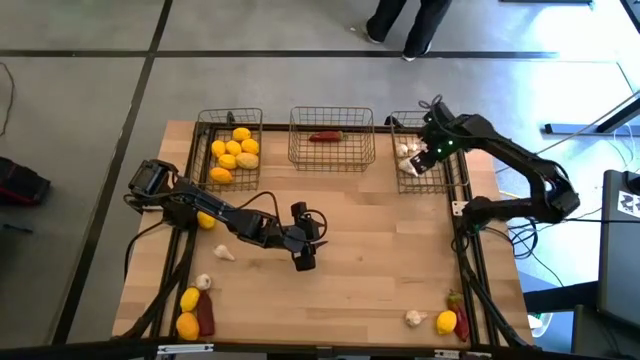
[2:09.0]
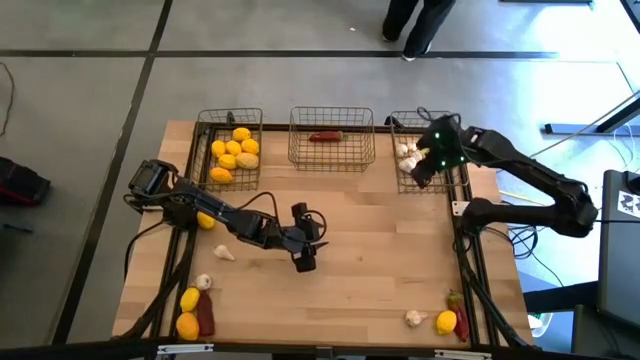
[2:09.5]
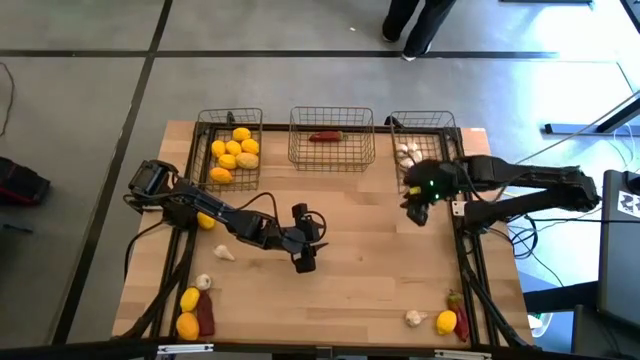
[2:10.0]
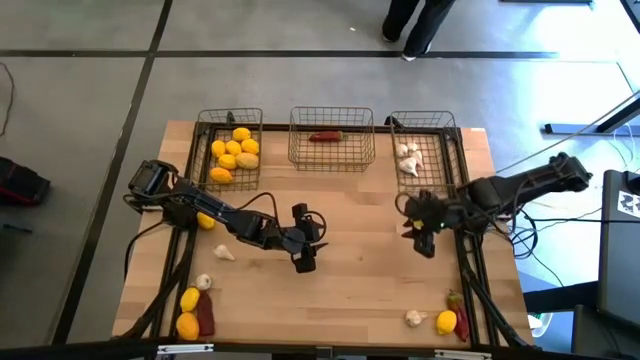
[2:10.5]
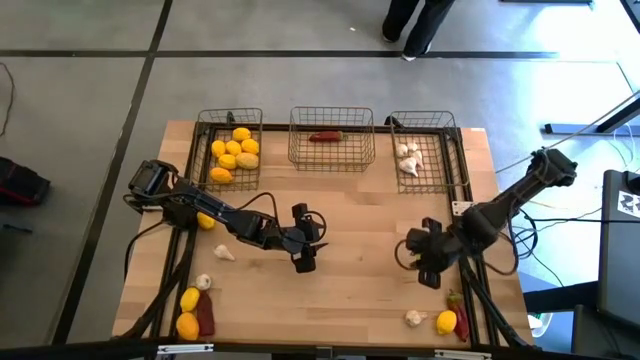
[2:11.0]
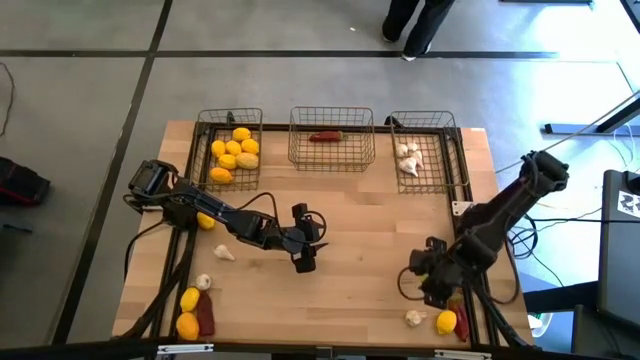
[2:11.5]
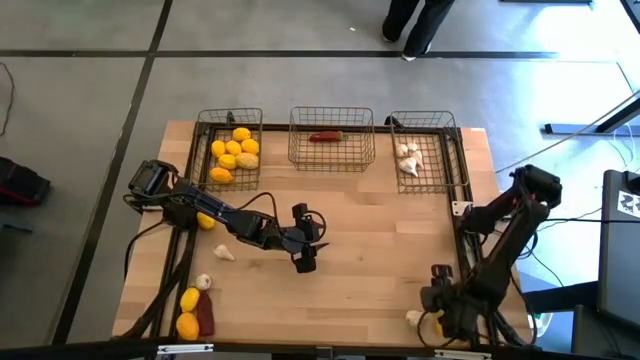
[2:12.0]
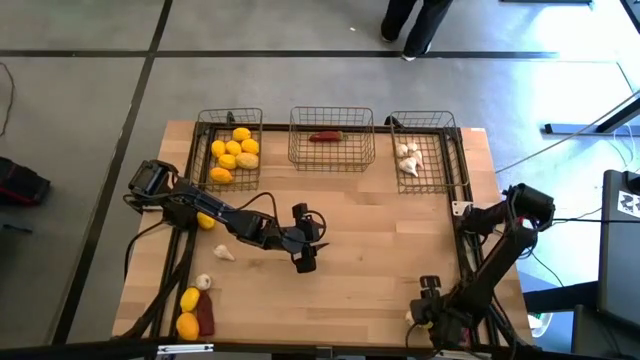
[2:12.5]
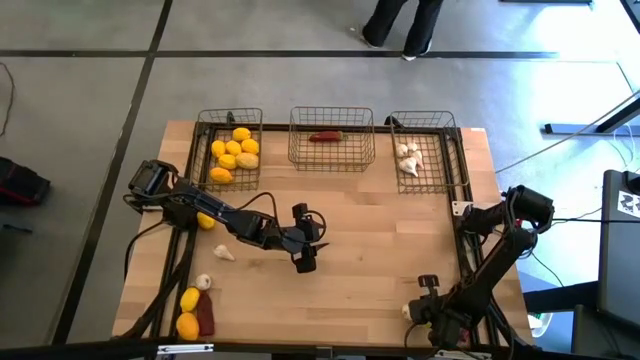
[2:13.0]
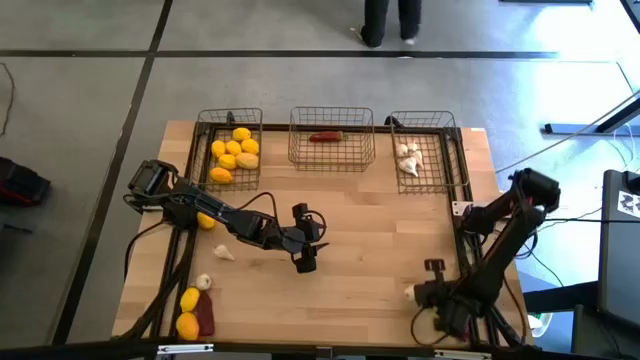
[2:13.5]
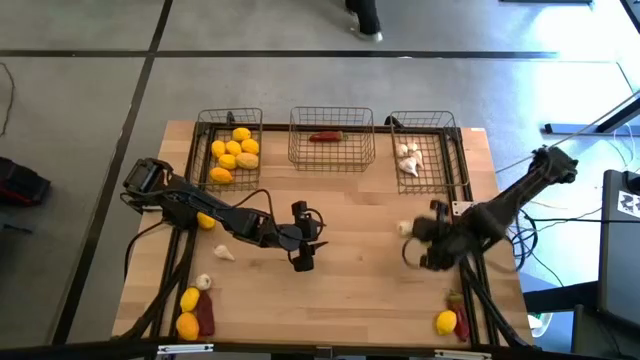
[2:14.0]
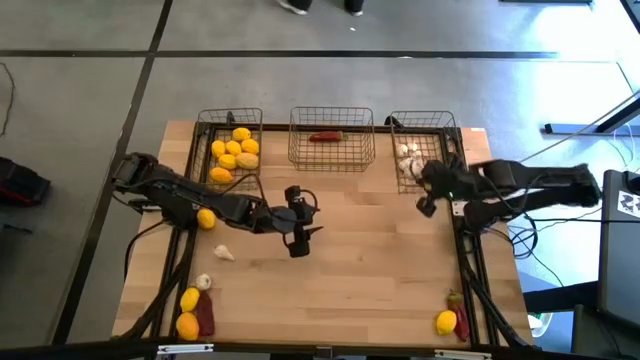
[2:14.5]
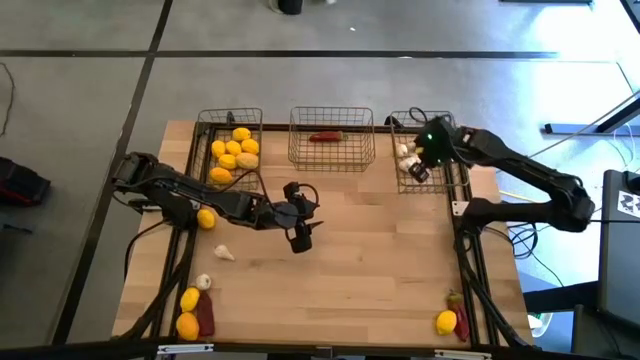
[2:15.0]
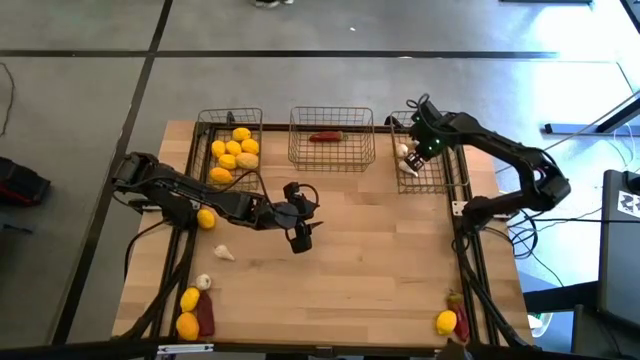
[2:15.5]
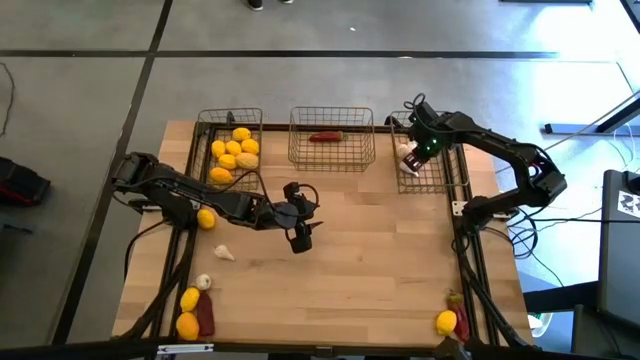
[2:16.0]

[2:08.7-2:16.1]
Task: Sort produce into baskets
Put the white garlic into the right gold wire basket

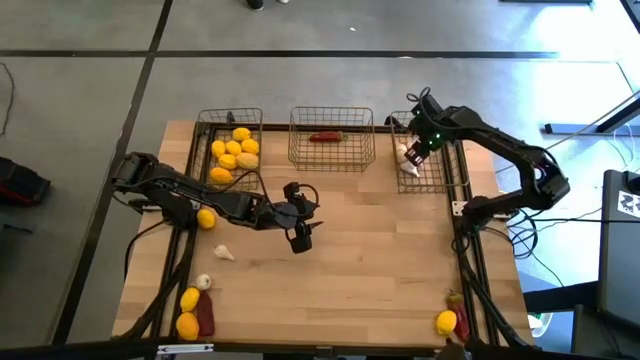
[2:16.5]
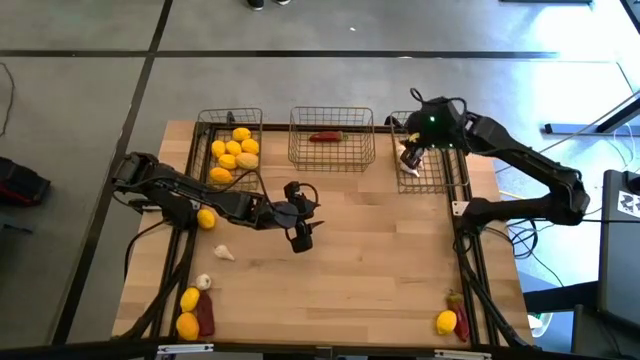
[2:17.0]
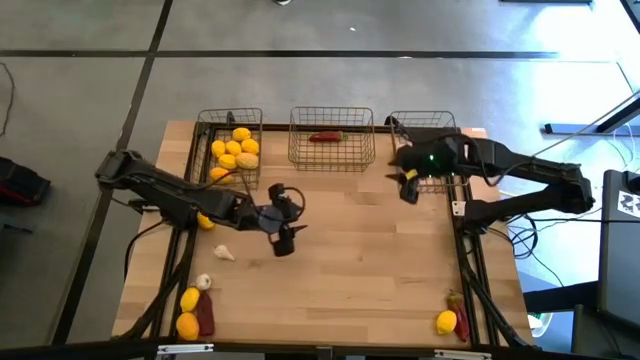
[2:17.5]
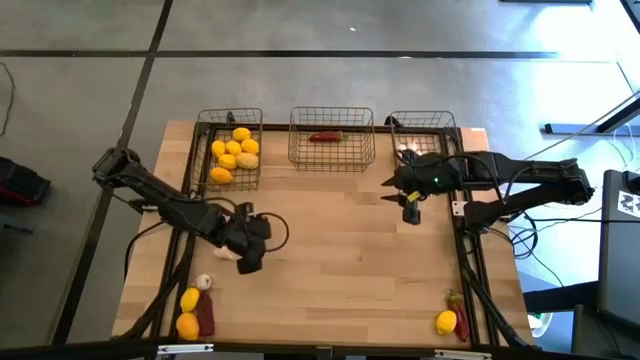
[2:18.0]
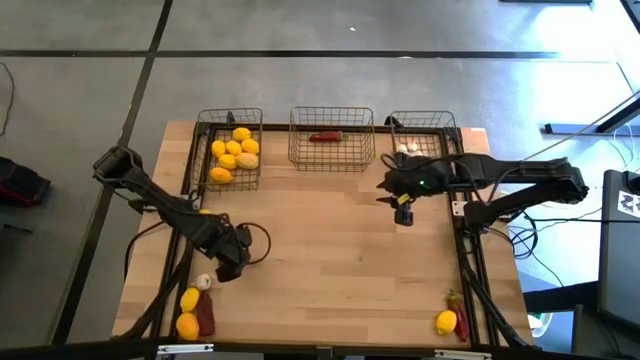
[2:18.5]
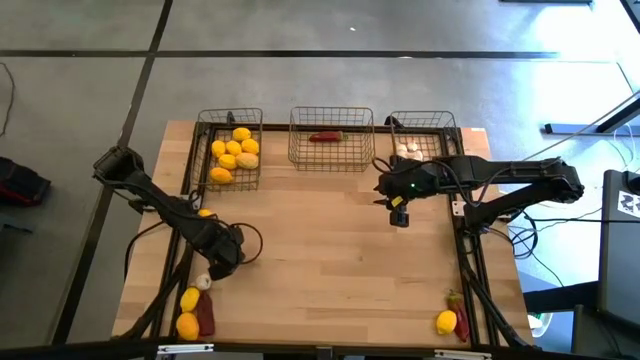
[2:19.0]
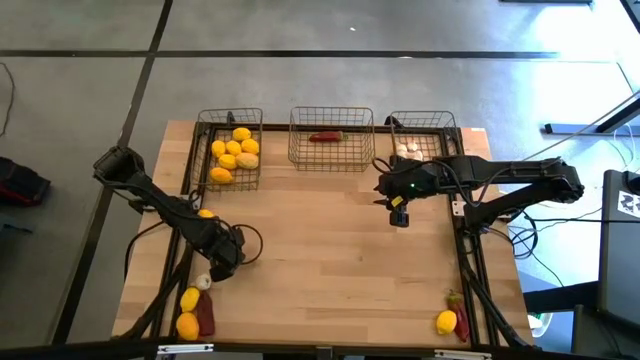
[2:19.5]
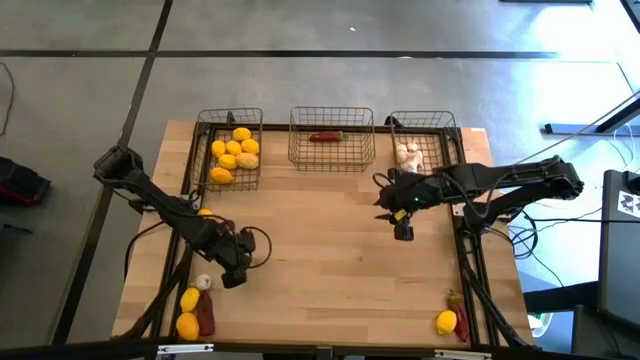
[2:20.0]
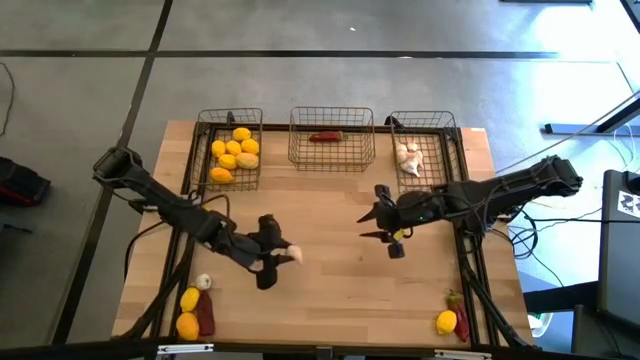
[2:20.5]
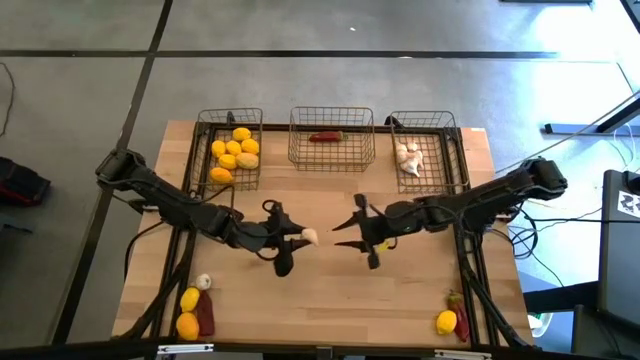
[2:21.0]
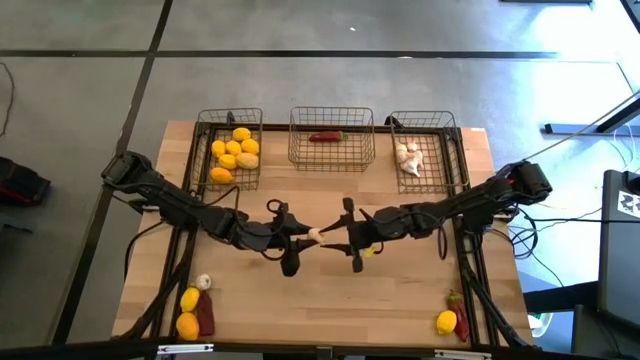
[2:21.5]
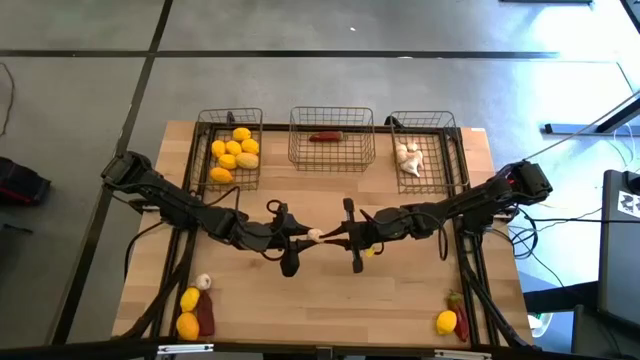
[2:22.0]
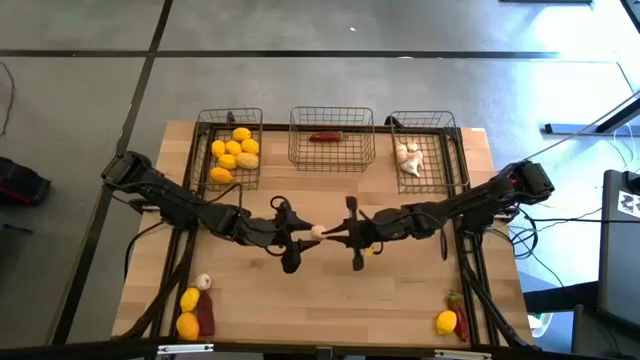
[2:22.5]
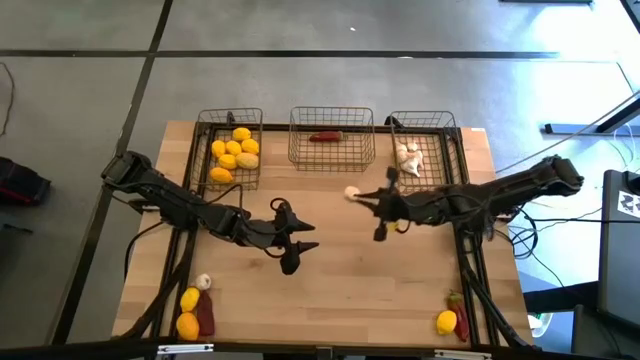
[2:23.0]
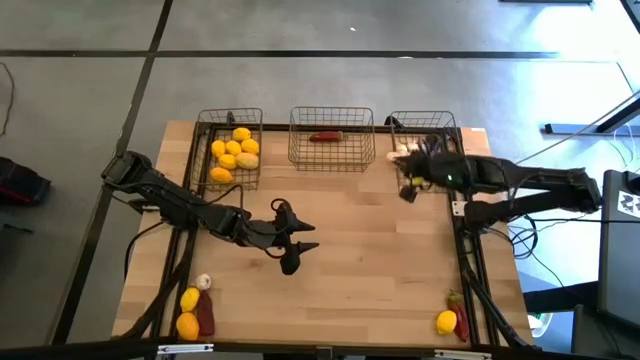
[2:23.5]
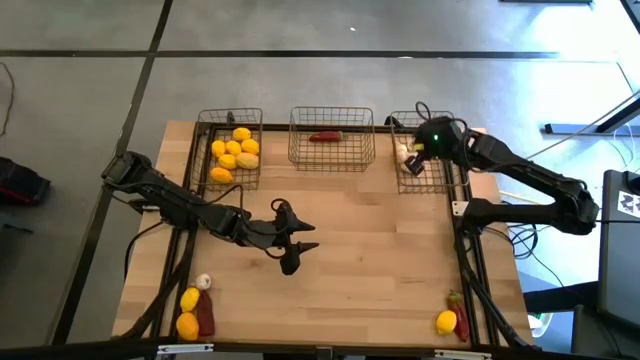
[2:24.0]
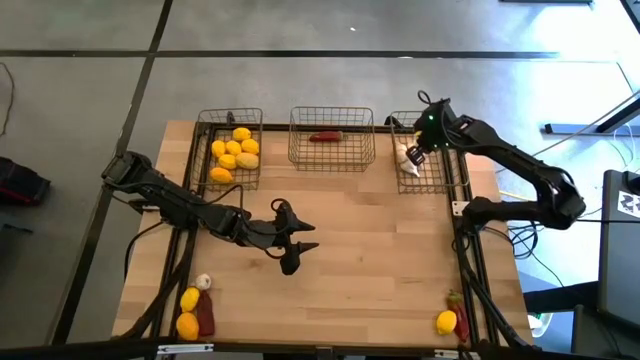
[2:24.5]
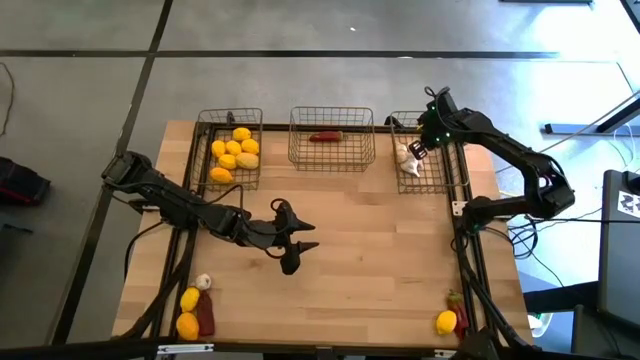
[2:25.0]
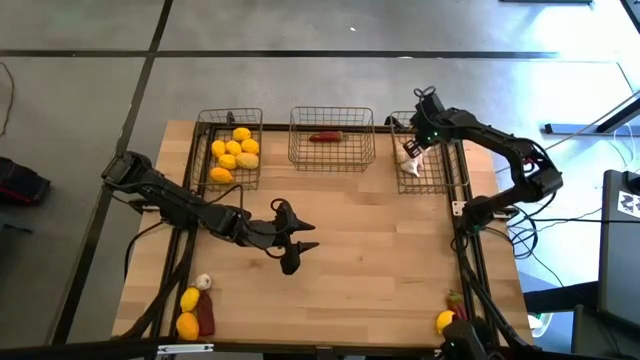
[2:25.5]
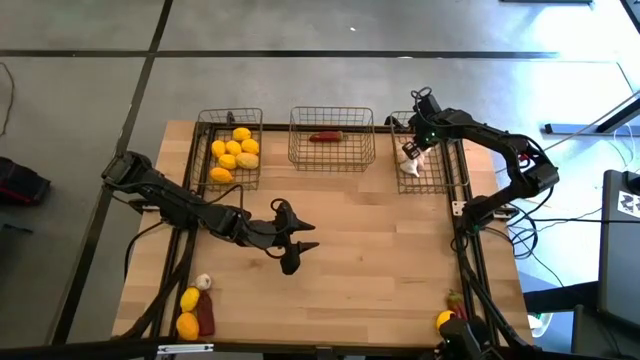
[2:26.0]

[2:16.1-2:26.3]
Put the white garlic into the right gold wire basket

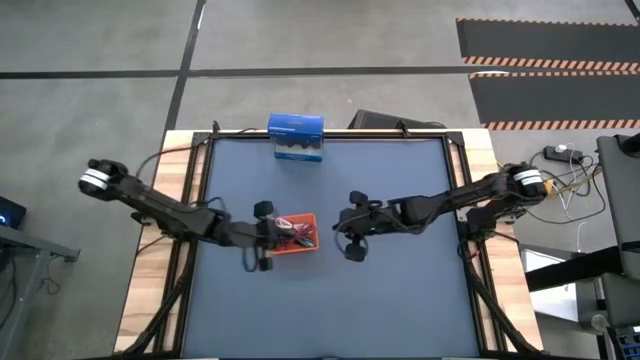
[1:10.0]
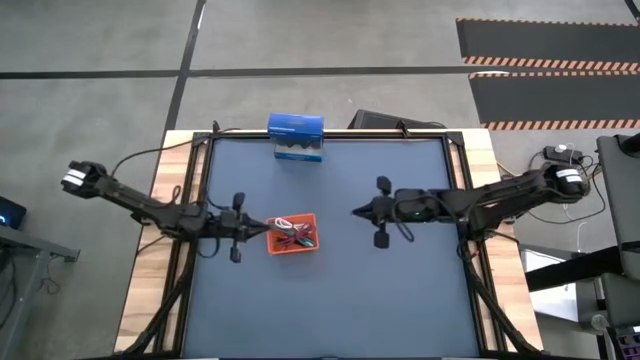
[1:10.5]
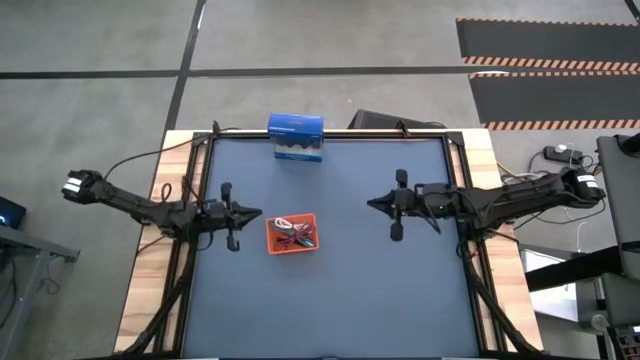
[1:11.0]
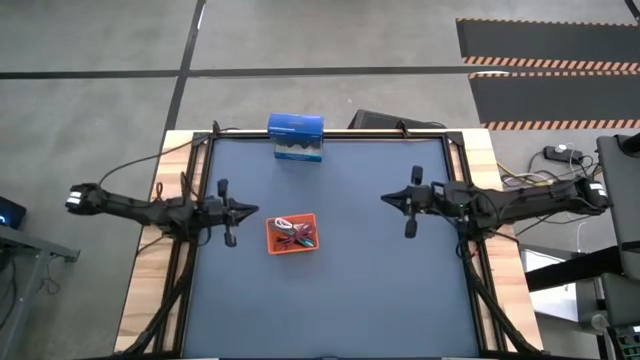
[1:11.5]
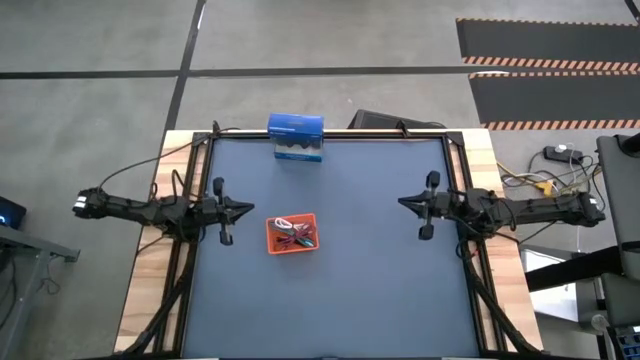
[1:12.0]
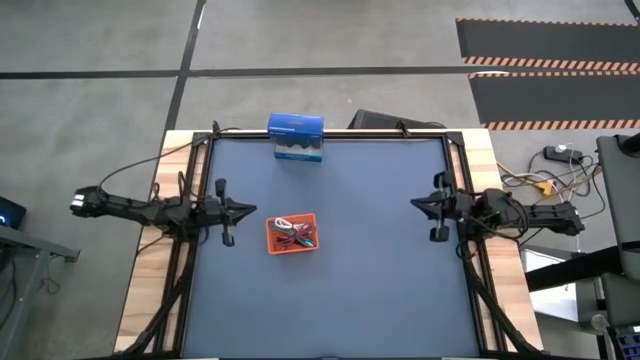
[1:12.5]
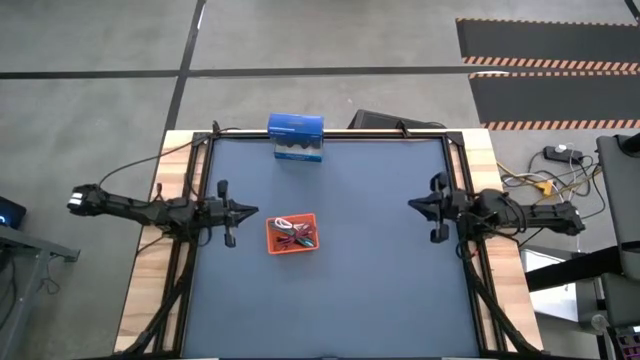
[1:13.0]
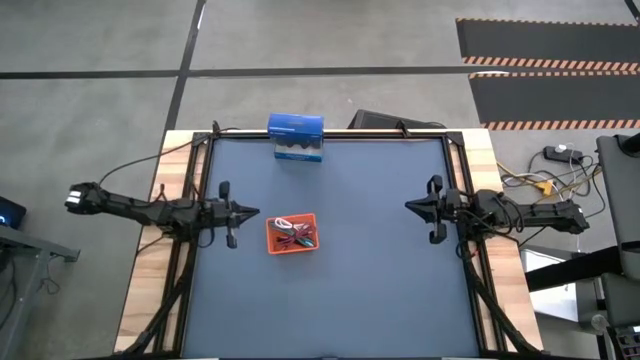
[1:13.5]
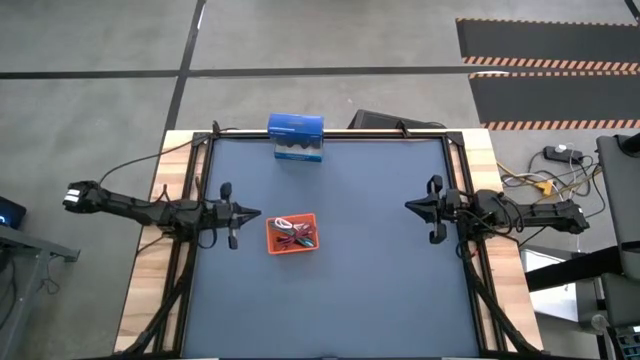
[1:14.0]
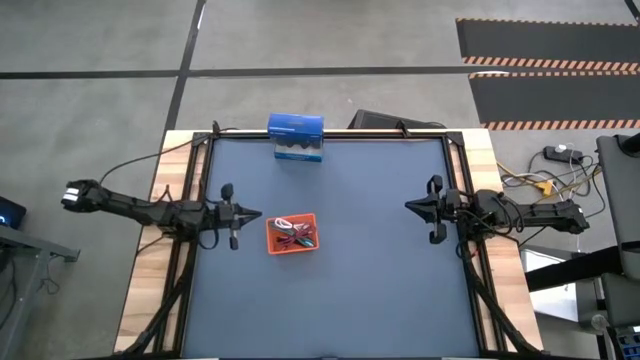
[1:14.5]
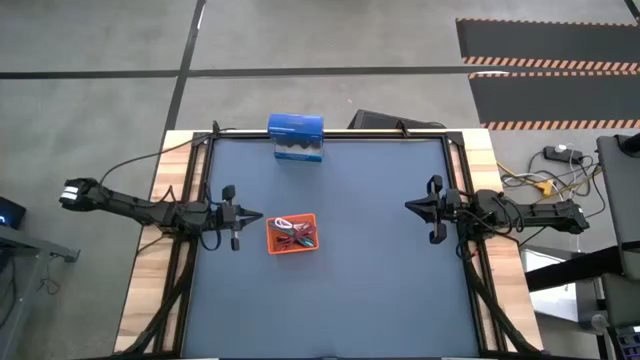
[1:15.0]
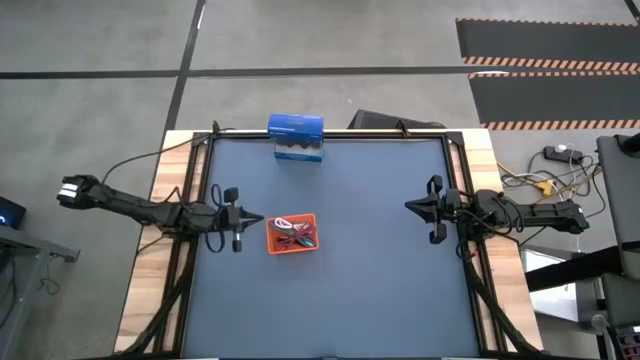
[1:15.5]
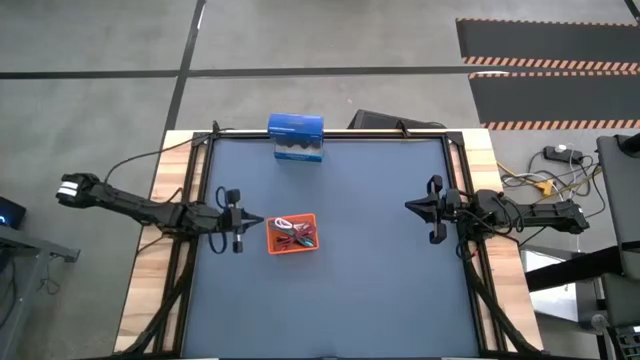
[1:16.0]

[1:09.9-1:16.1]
Task: Pick and place USB-C Cables
Return to Home Position
